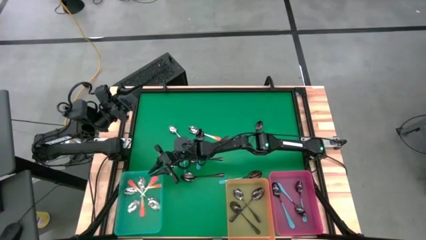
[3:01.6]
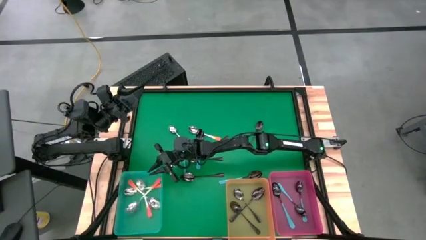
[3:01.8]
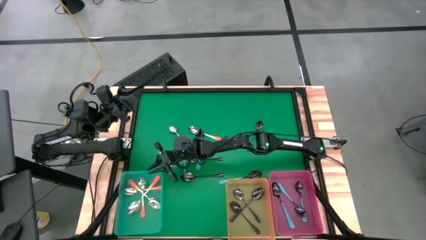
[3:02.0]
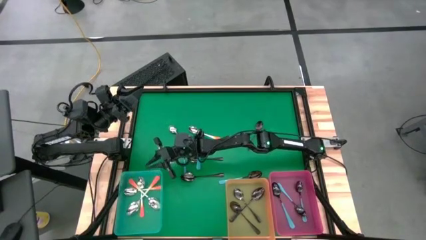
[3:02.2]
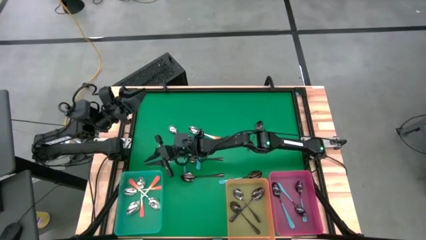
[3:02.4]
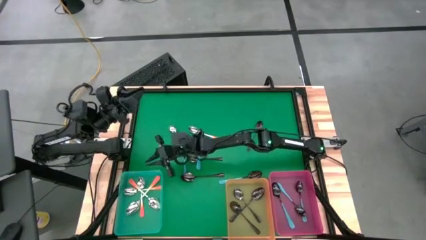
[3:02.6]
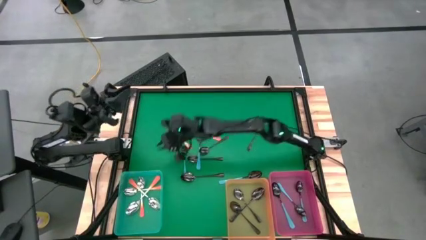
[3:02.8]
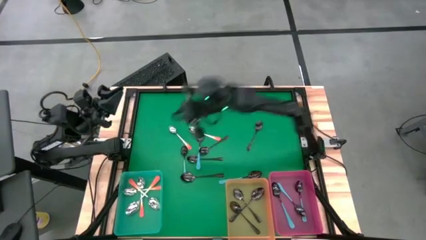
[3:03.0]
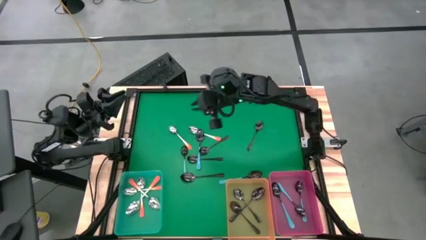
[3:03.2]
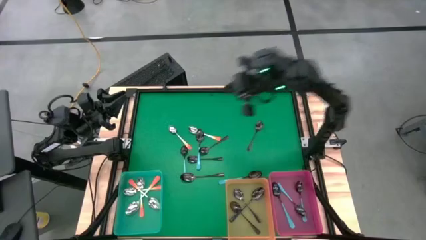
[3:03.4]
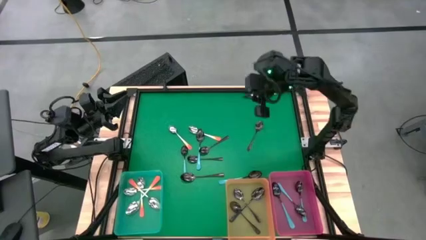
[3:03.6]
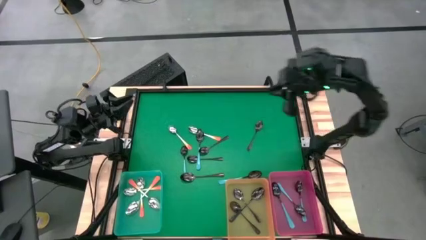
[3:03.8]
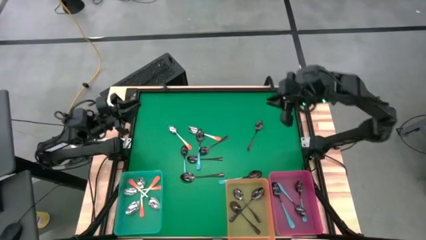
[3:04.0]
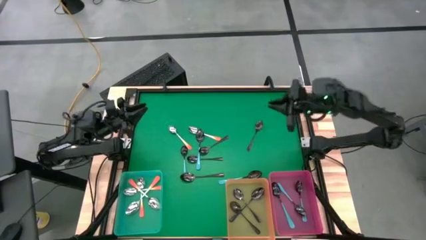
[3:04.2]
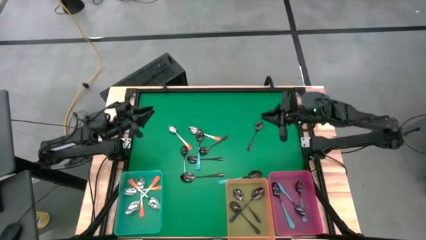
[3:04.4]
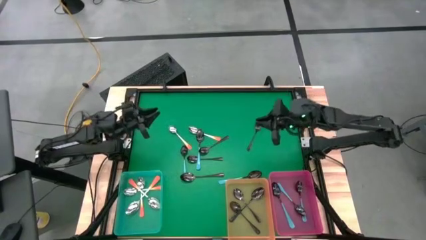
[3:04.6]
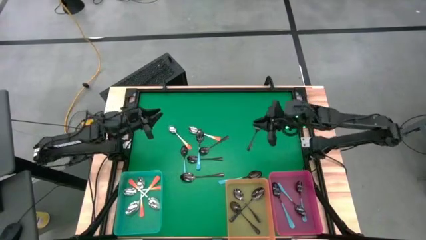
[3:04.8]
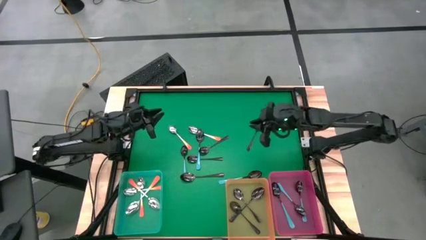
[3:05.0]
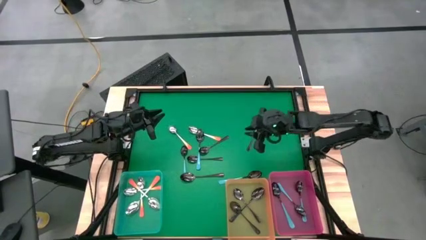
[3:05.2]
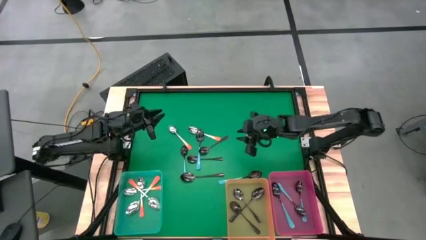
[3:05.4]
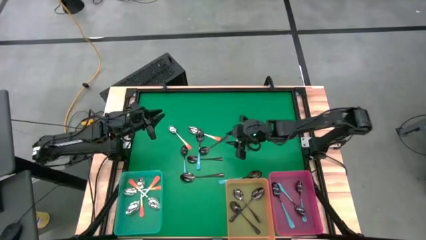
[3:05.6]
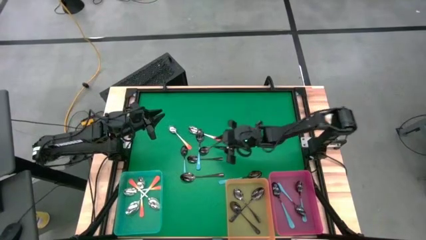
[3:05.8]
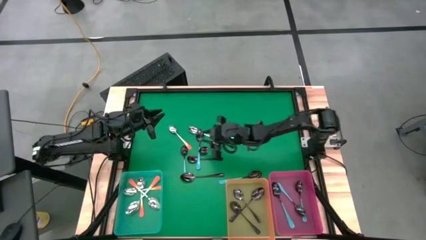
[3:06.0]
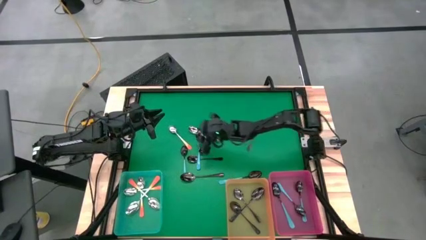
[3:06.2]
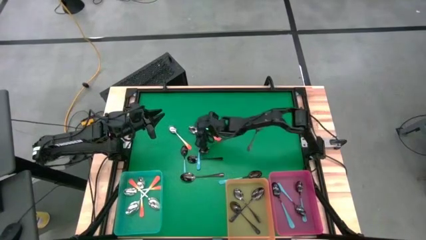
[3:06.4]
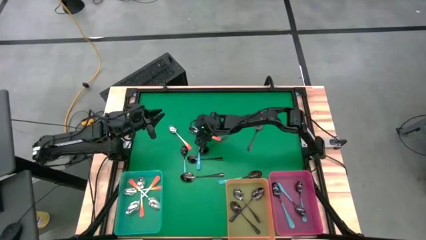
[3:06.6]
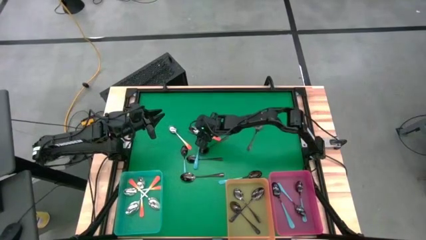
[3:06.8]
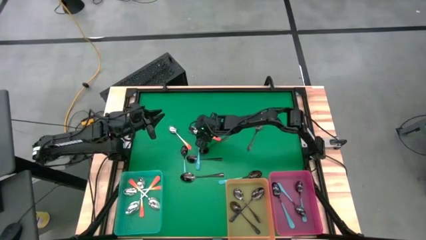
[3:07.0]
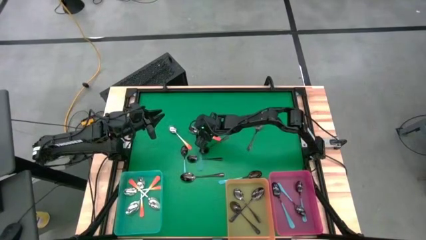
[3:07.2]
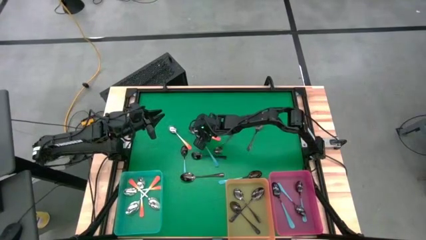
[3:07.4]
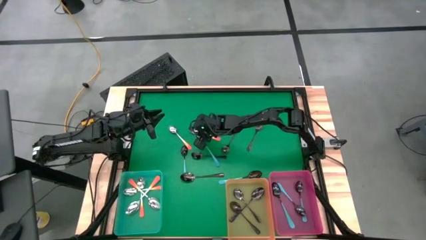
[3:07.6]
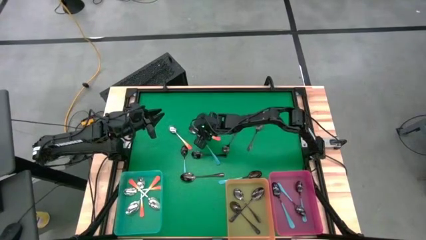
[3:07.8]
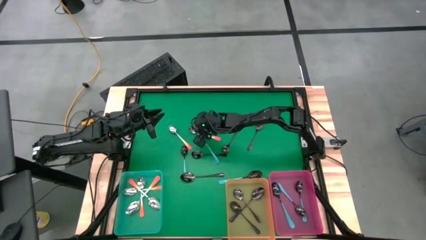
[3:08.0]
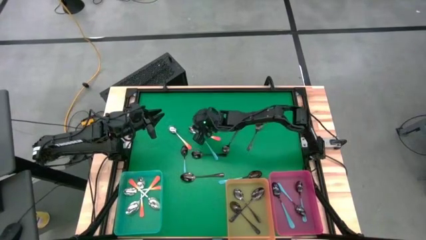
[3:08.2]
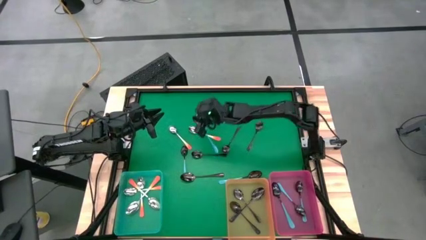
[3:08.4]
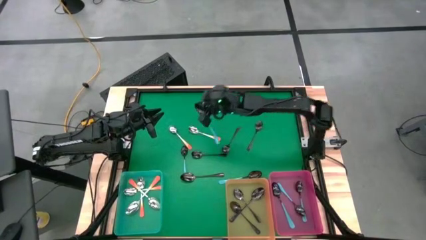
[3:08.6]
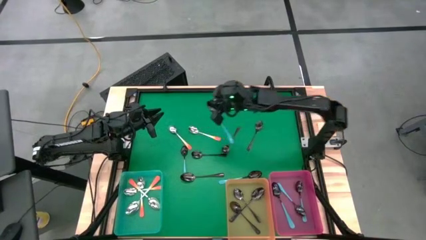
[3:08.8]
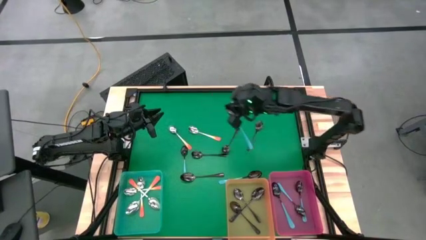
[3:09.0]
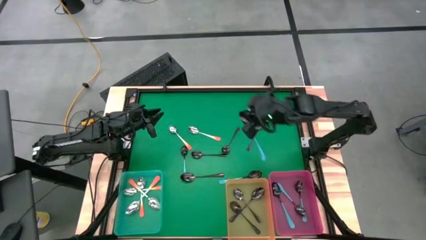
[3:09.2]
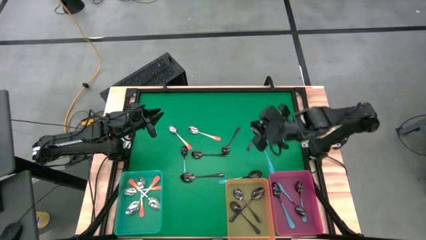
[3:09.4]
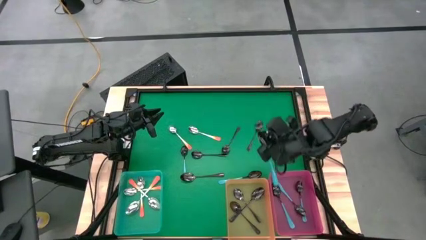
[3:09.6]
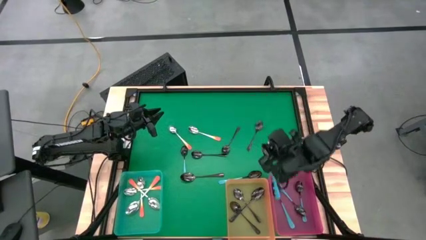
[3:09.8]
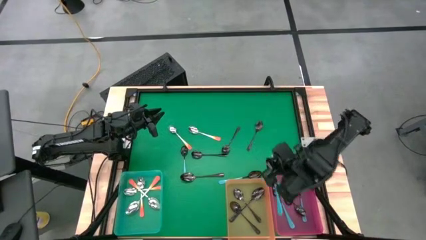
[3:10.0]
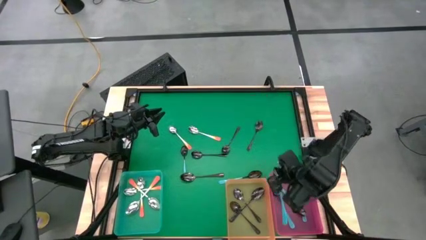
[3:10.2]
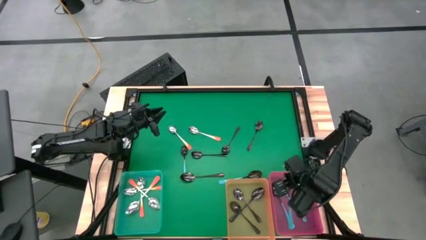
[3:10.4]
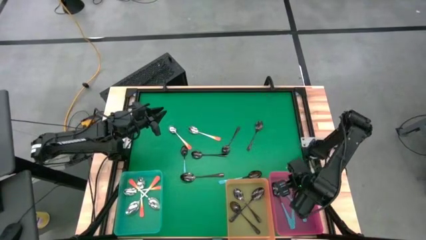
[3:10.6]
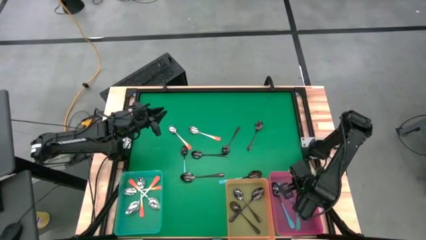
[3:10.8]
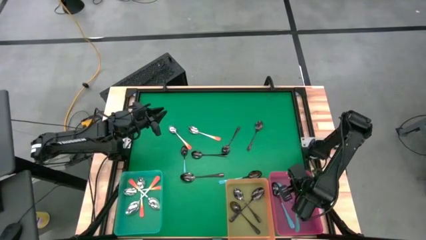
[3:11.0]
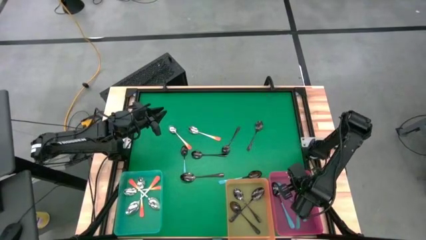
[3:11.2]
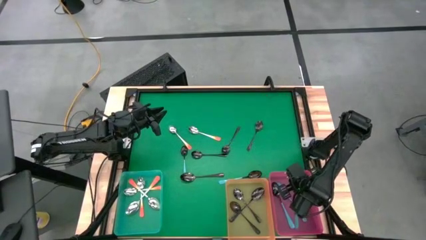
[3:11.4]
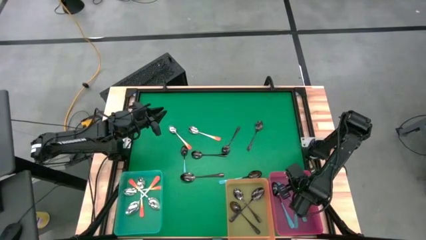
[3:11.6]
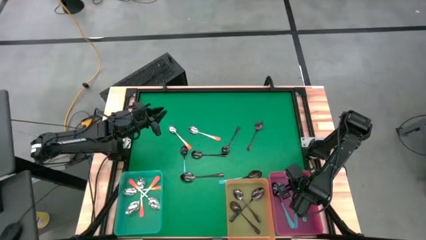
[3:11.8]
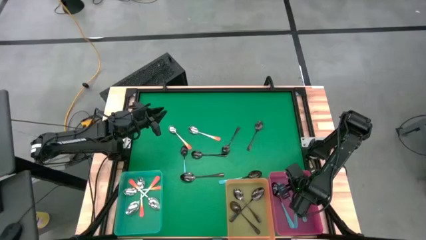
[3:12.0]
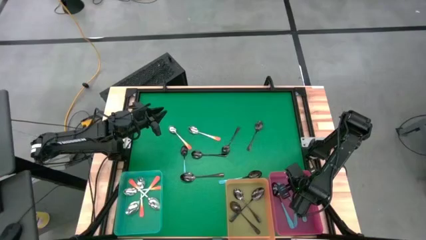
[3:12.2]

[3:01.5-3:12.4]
Task: Sort silverware by color (type)
Put the blue spoon into the pink bin
